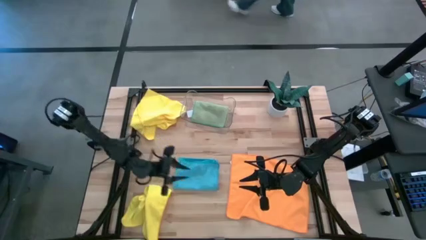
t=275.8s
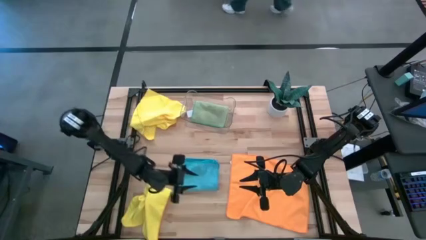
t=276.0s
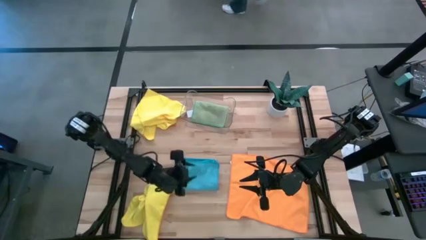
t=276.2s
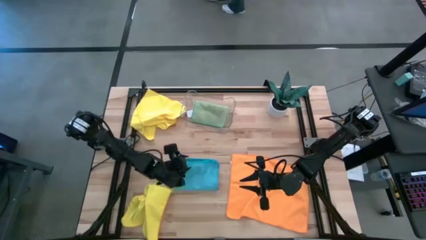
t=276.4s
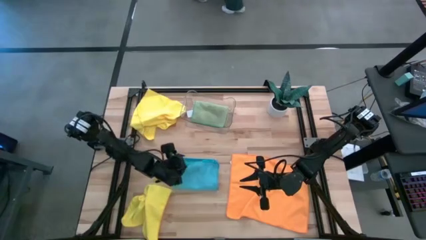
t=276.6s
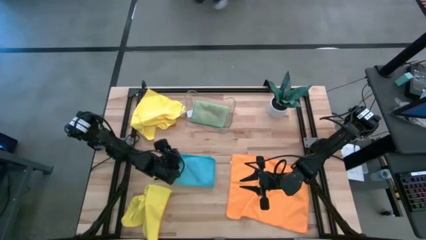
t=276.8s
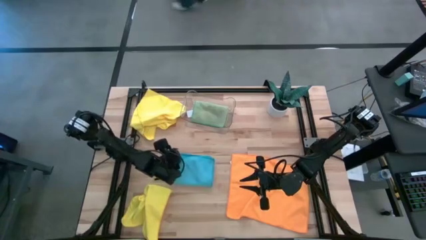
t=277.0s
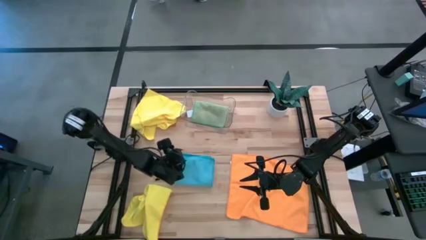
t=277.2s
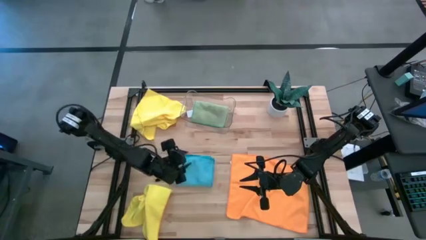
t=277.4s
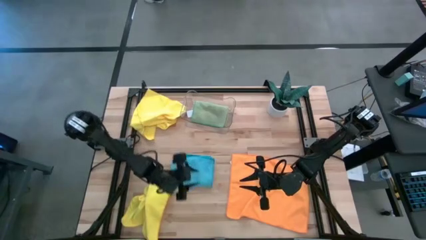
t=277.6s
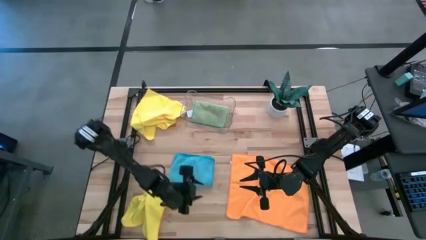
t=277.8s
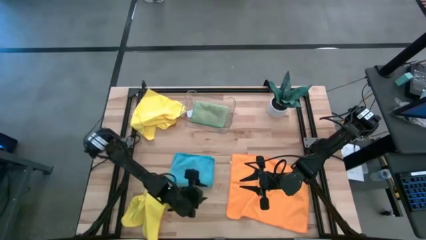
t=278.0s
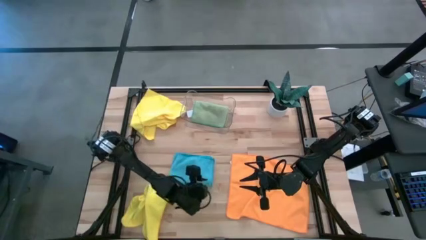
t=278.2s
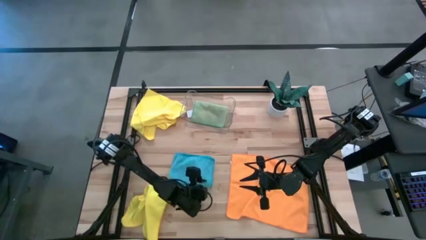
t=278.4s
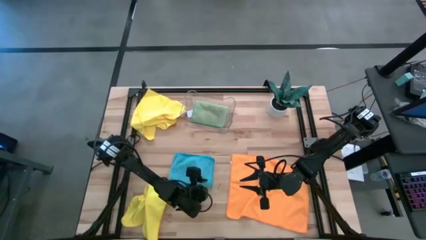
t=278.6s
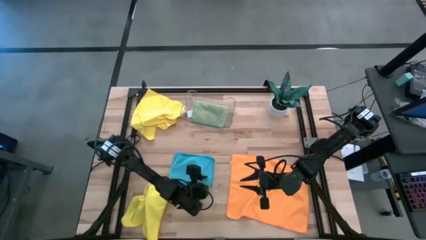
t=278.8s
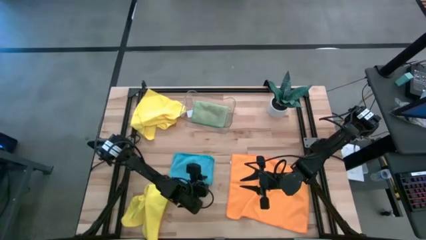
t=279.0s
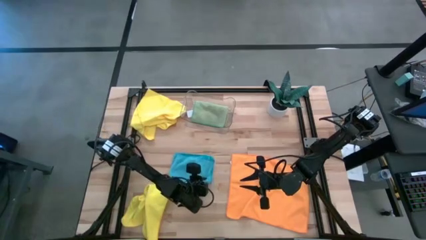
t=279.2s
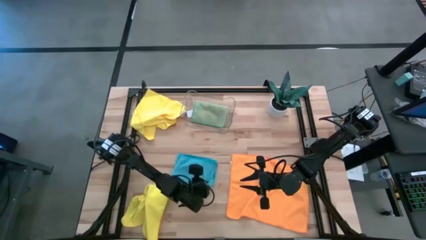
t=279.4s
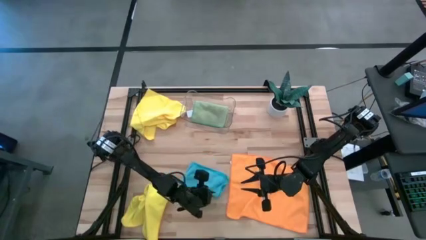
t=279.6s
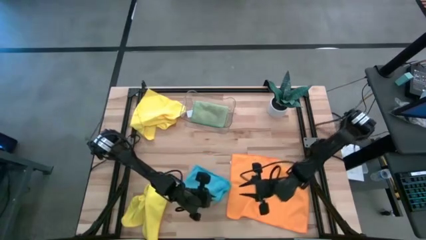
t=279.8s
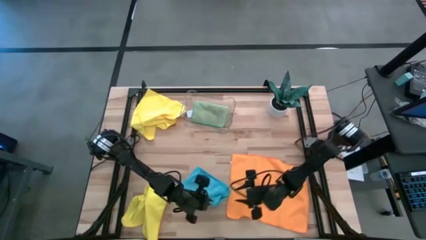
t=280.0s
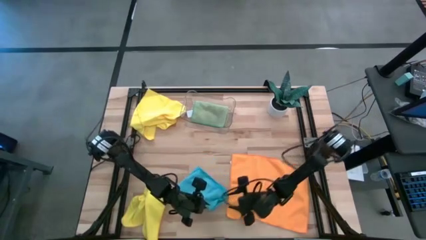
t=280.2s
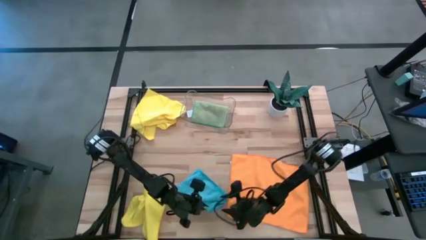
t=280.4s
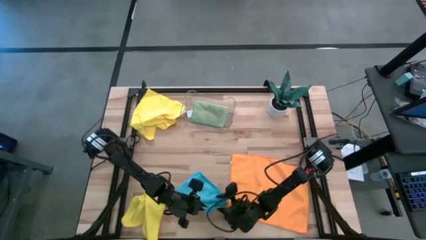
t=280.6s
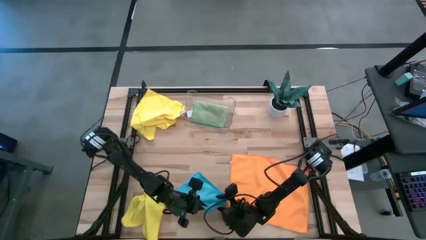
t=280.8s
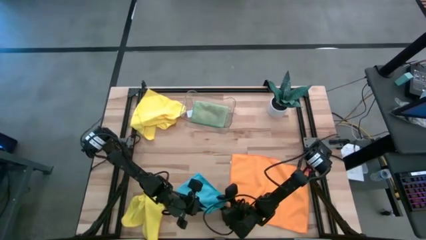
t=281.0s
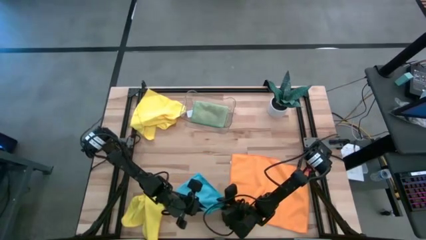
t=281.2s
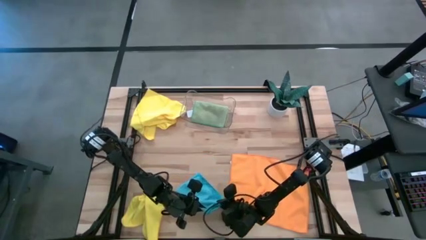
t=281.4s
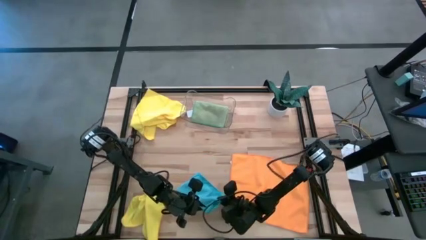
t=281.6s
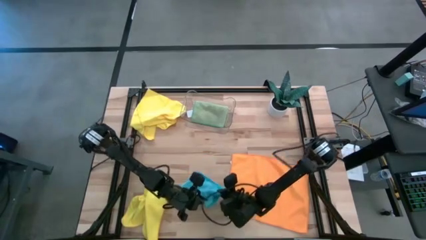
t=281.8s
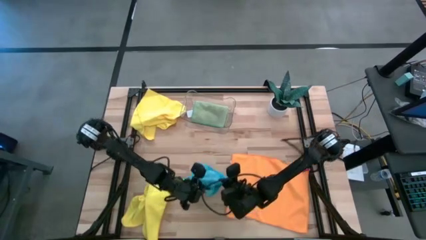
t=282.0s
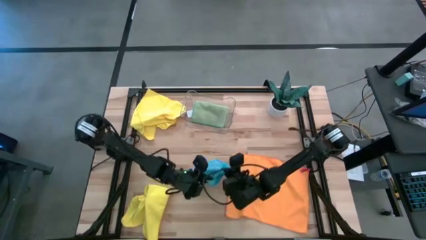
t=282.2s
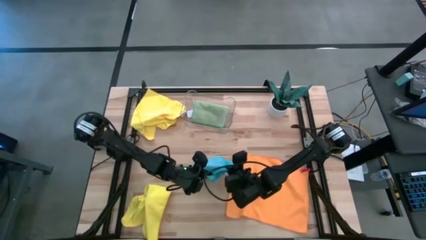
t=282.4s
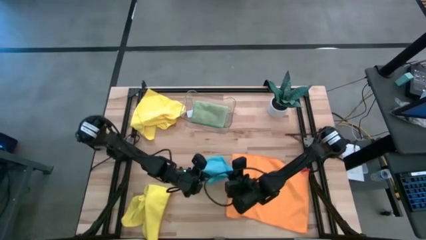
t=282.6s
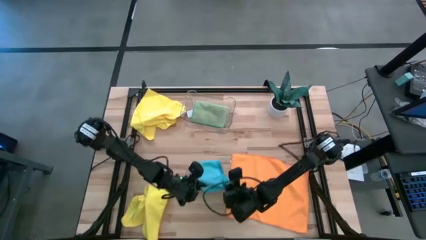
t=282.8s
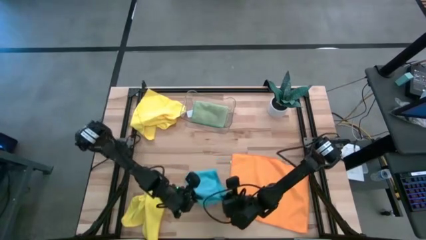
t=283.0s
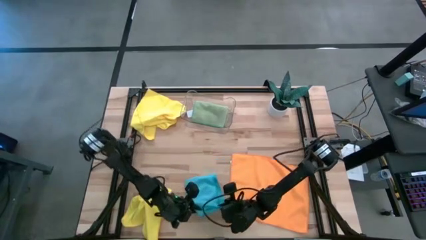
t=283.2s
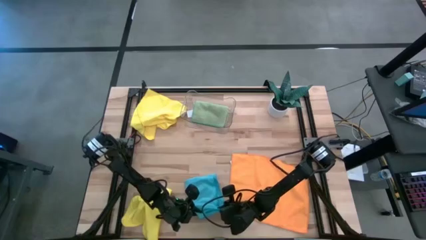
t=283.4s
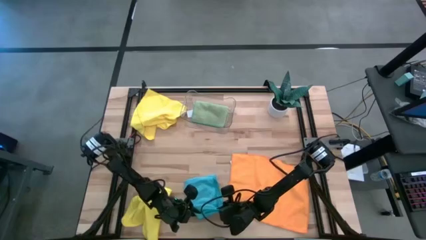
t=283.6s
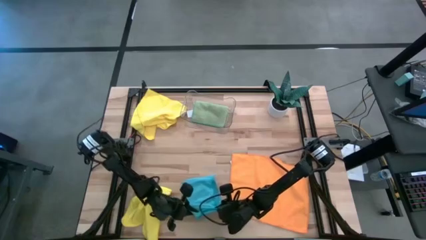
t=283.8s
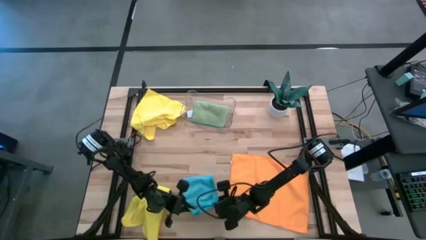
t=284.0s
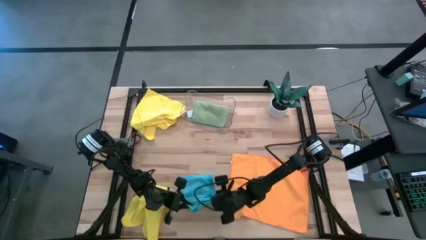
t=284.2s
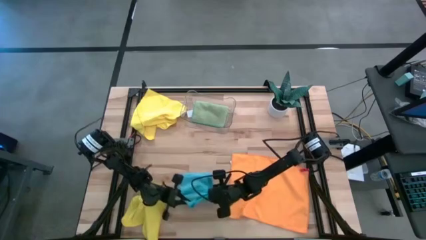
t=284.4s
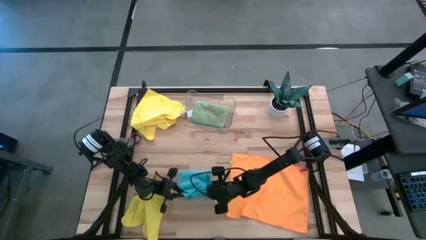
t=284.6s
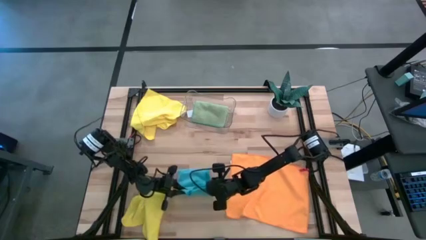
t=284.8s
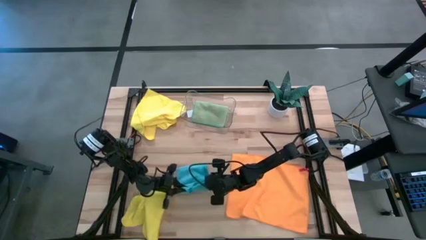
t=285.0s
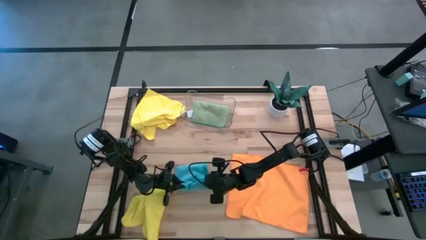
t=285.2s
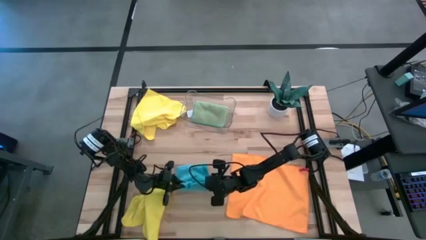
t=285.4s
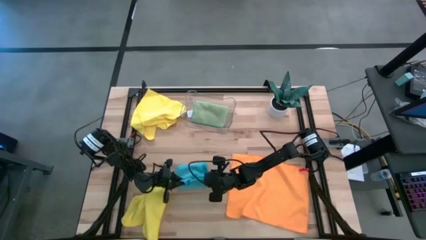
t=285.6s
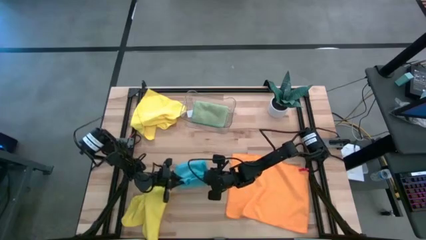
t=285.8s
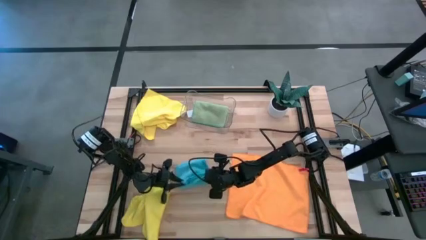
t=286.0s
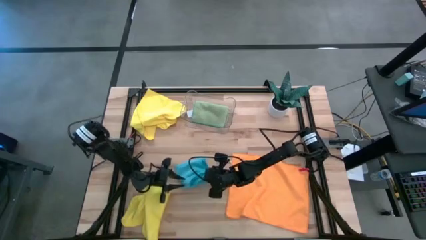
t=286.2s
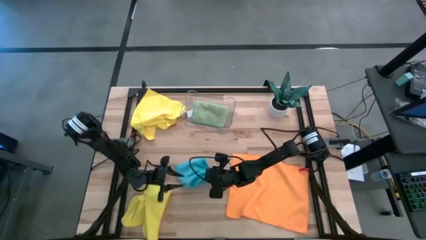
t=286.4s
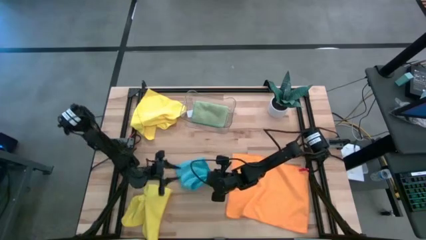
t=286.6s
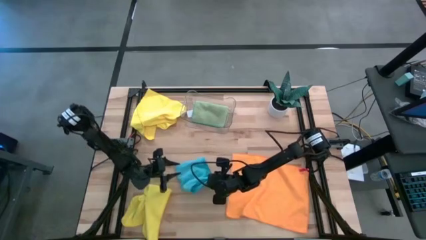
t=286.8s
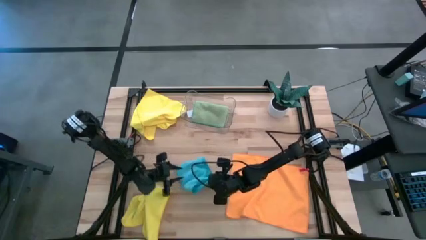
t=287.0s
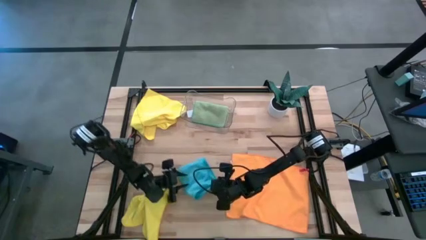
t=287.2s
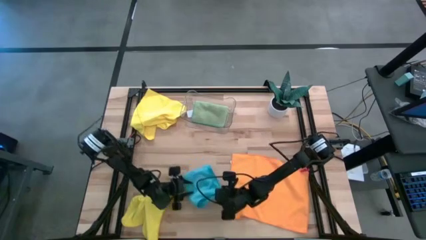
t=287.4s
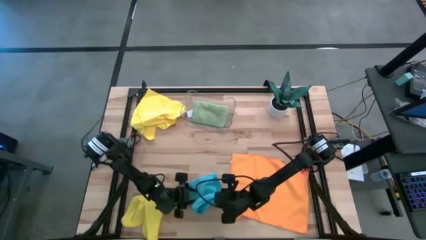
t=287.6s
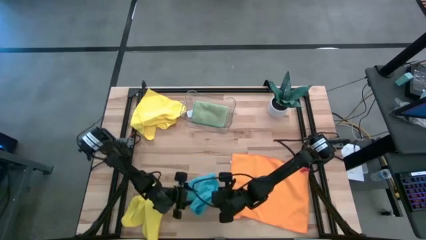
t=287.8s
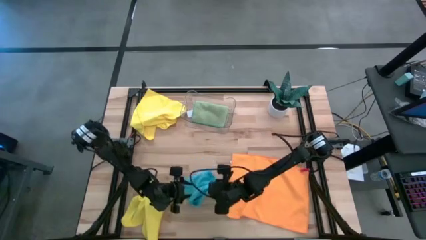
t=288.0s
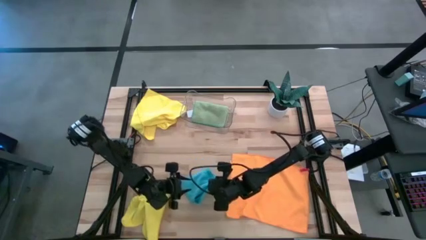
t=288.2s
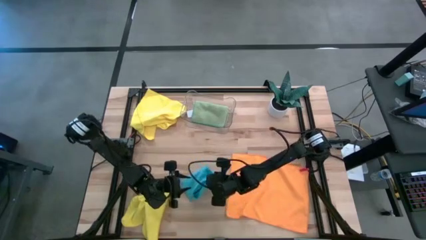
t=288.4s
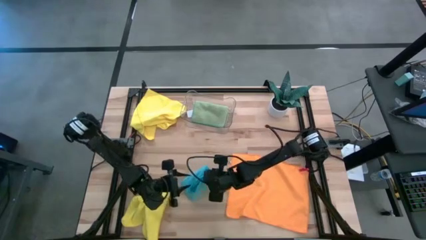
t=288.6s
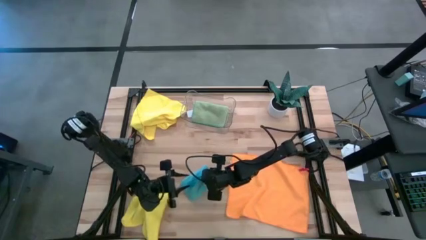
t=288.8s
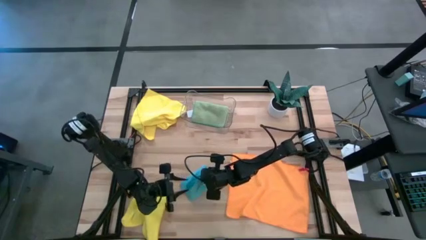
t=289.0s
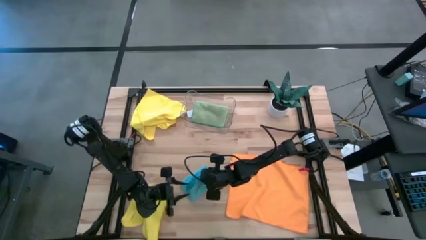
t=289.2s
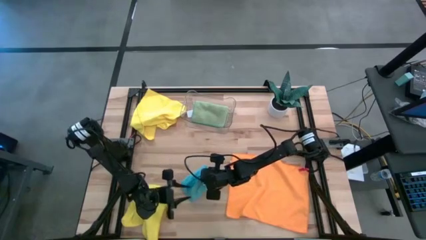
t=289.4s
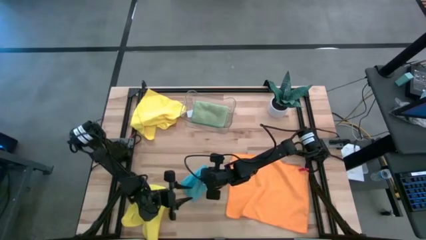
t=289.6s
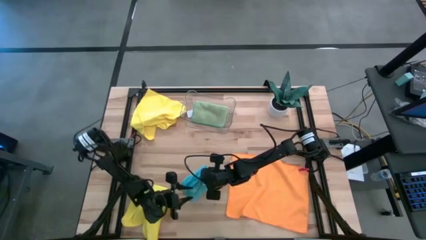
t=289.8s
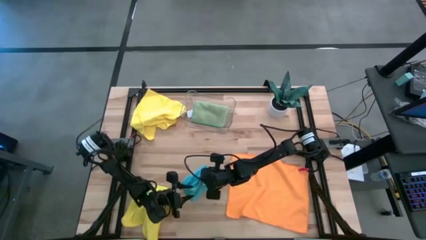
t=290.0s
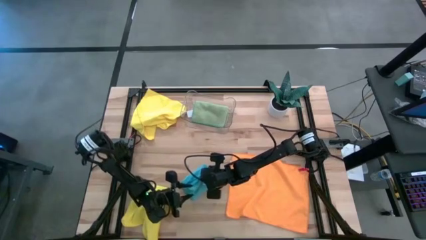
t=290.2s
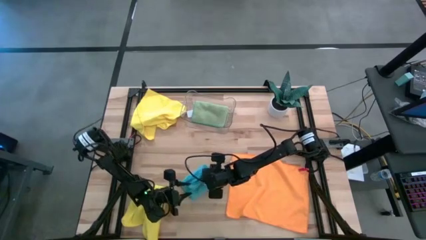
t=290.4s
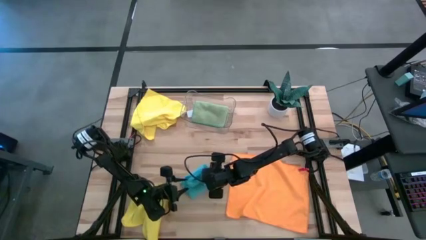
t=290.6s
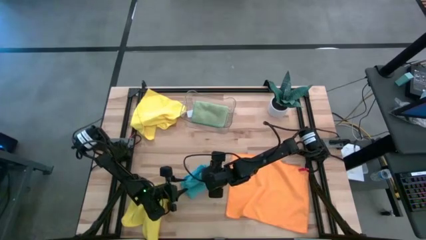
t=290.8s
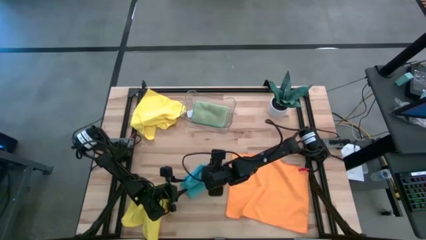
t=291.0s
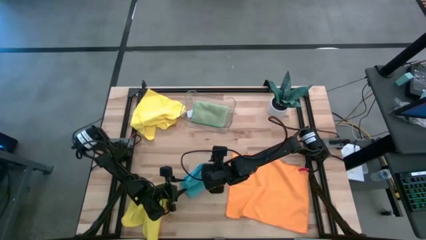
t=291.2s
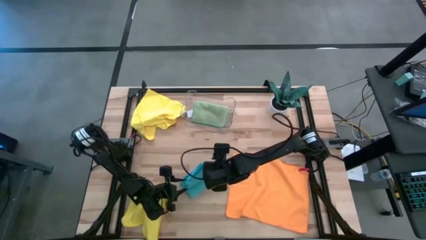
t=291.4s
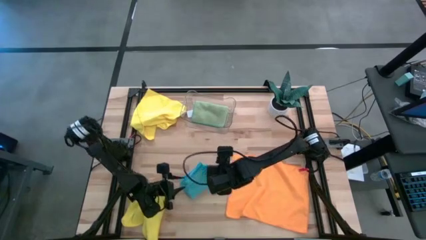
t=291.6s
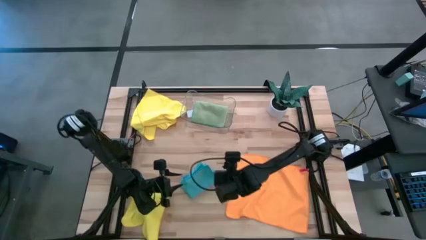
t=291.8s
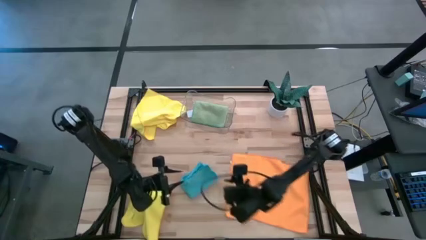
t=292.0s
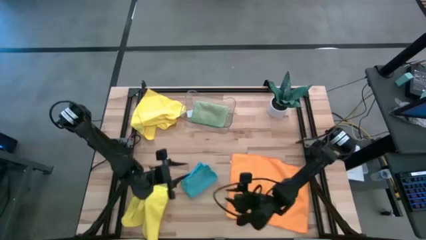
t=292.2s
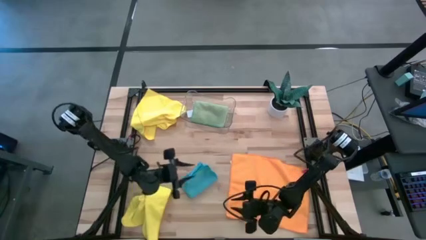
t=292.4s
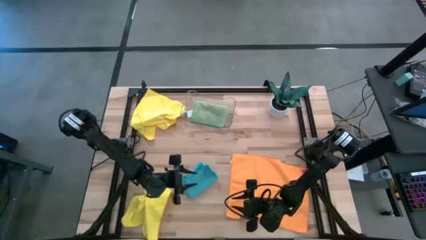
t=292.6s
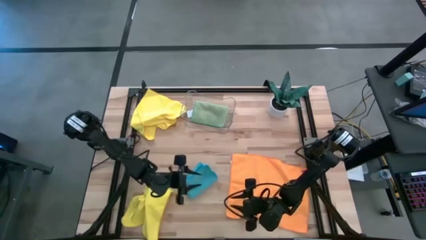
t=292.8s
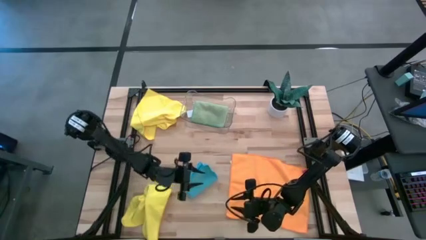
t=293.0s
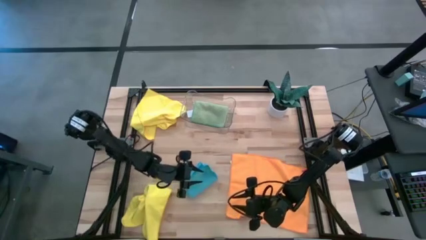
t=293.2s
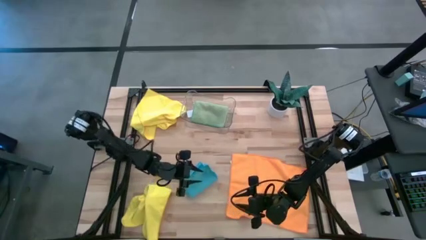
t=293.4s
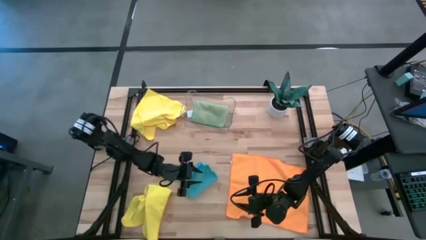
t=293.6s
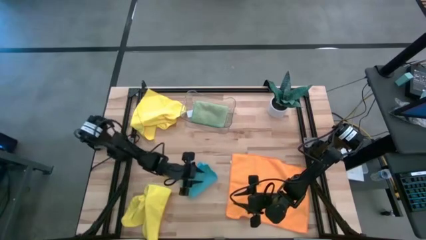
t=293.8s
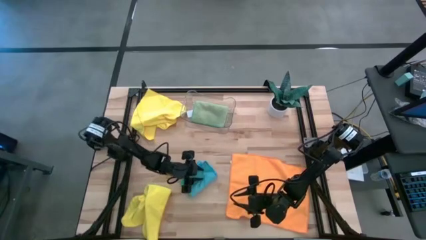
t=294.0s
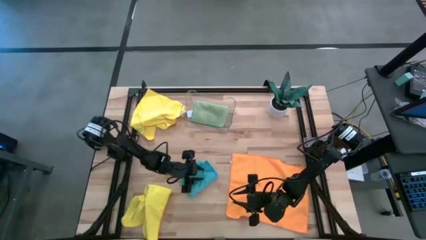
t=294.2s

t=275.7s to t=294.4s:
Task: Fold microfiber towels
Fold the blue towel
